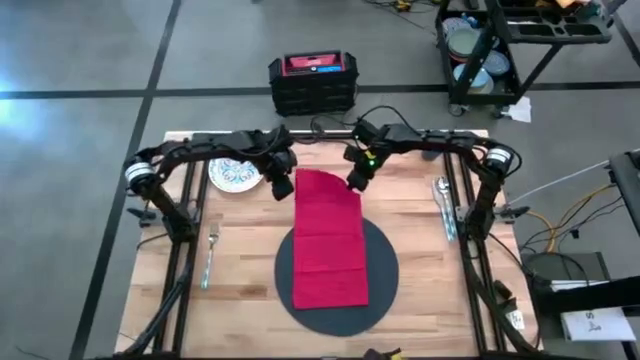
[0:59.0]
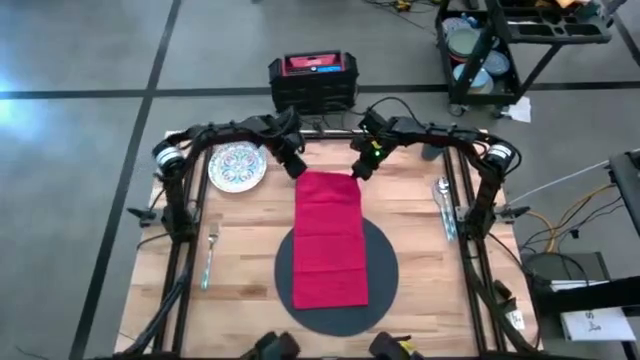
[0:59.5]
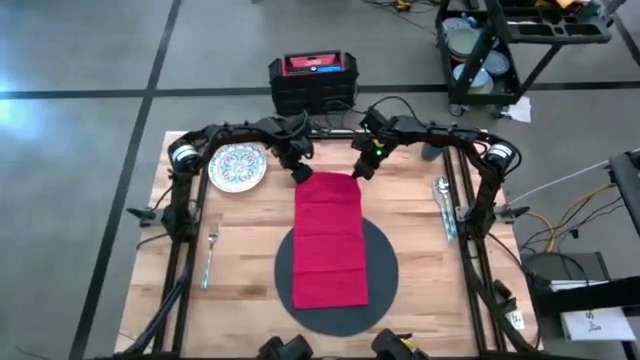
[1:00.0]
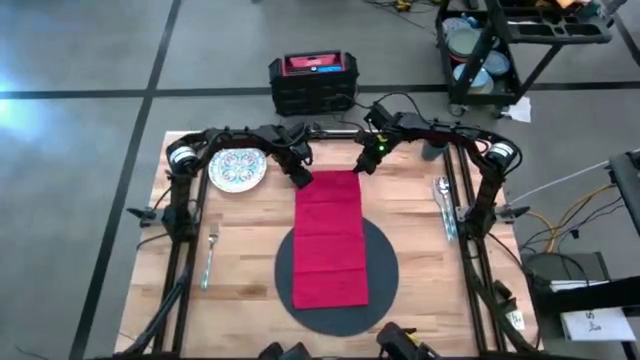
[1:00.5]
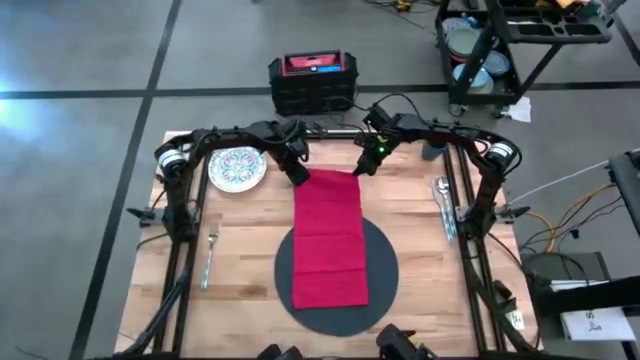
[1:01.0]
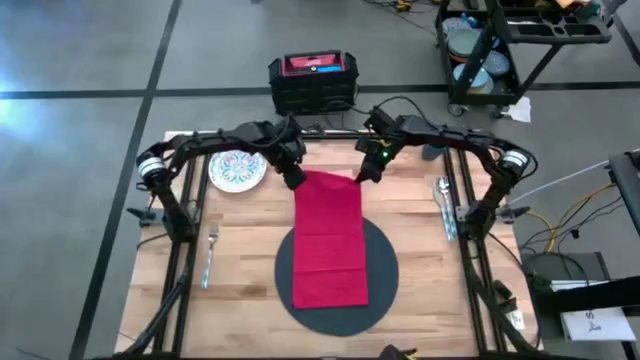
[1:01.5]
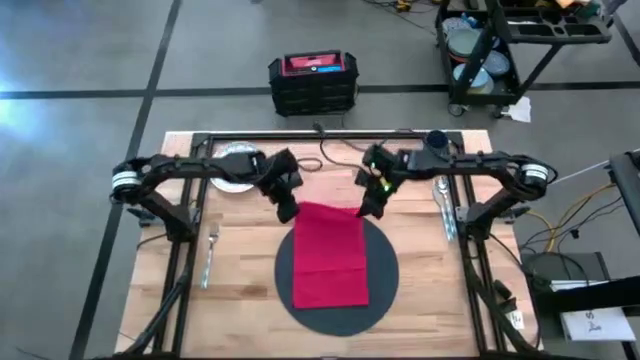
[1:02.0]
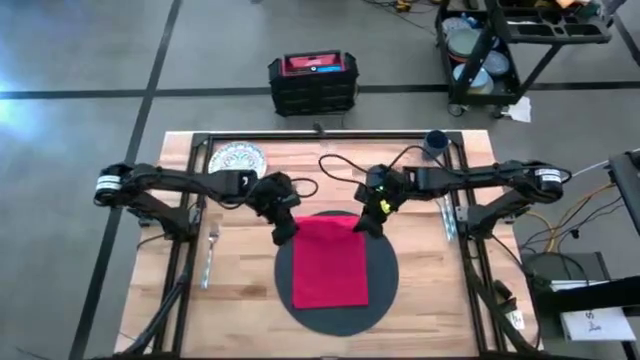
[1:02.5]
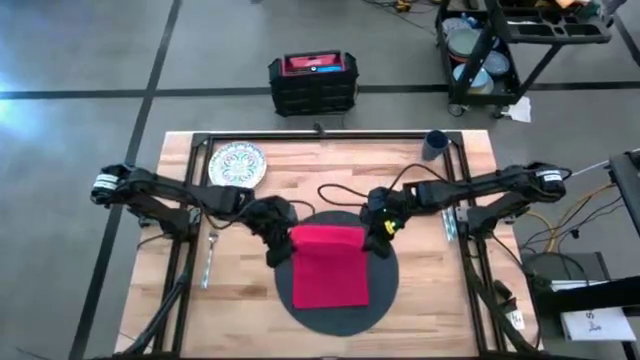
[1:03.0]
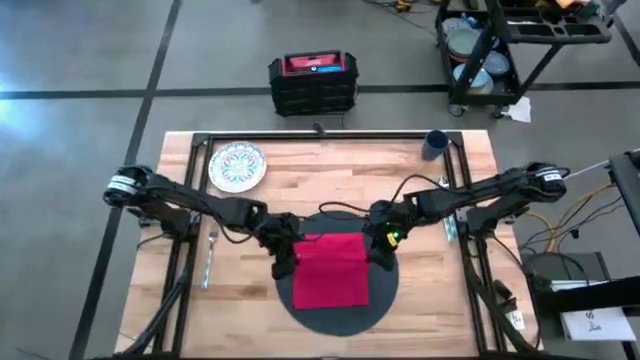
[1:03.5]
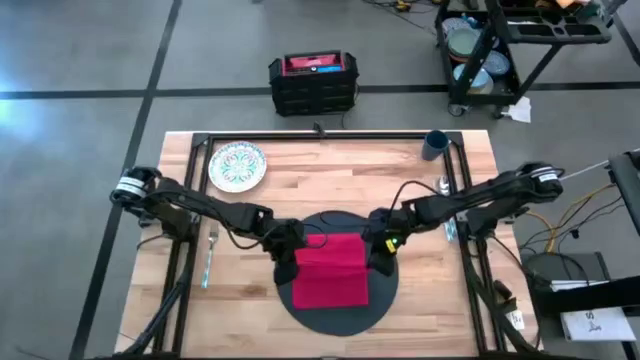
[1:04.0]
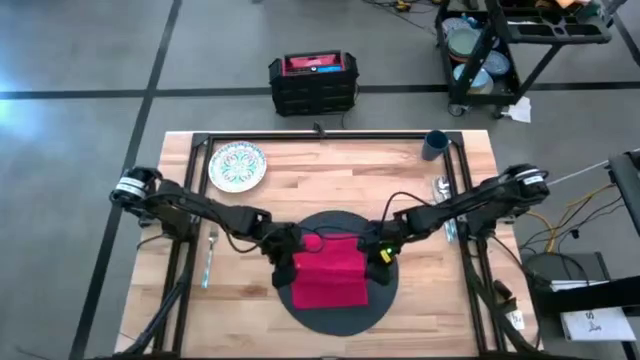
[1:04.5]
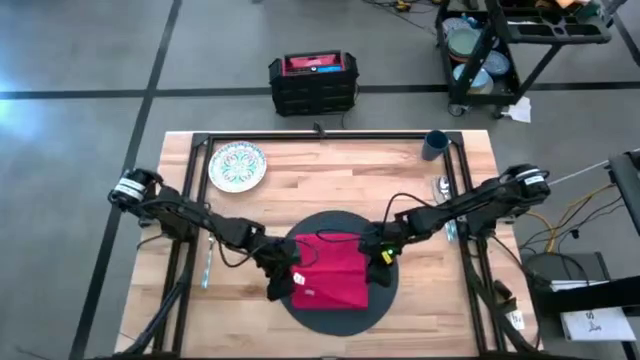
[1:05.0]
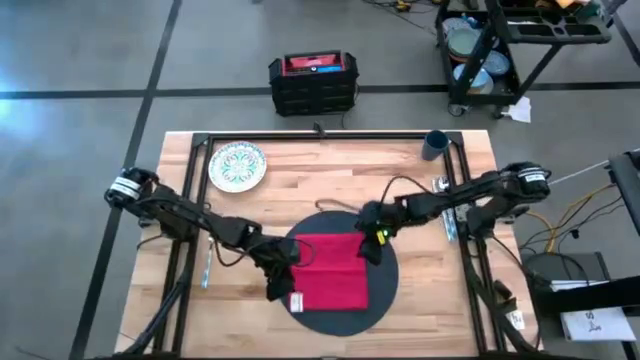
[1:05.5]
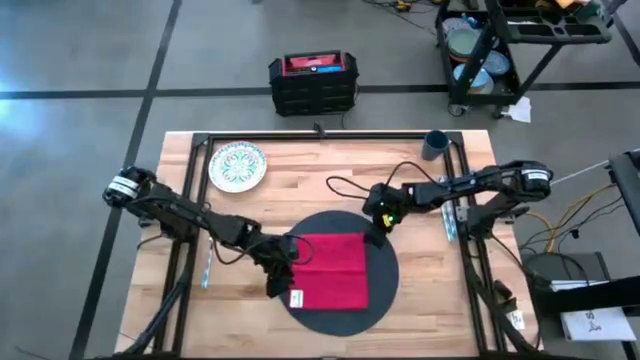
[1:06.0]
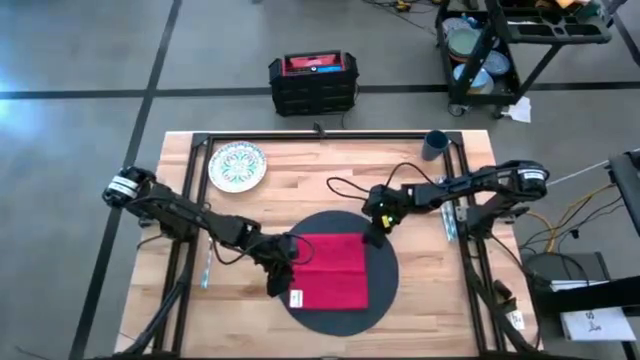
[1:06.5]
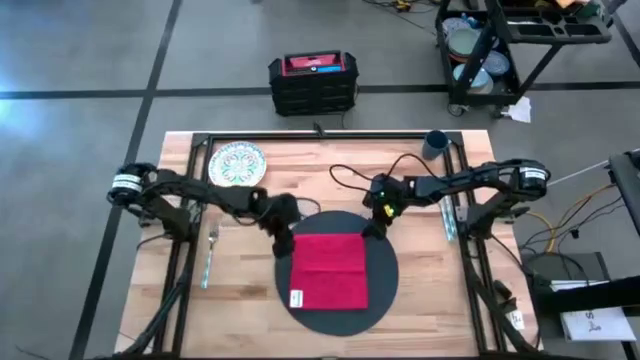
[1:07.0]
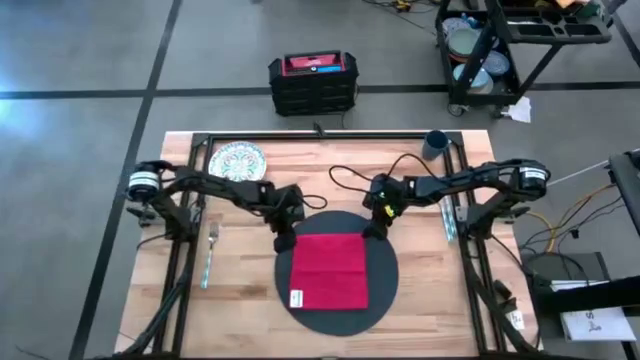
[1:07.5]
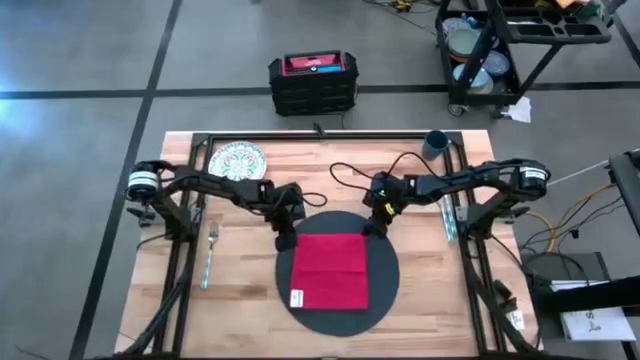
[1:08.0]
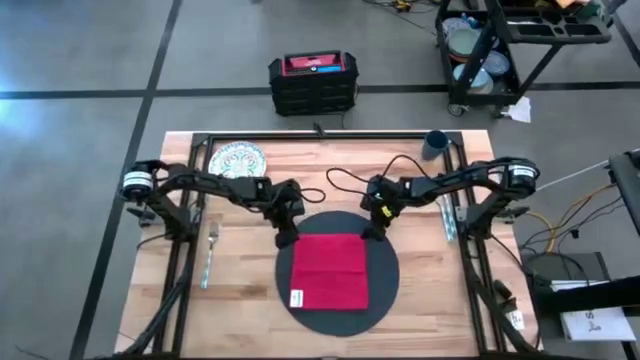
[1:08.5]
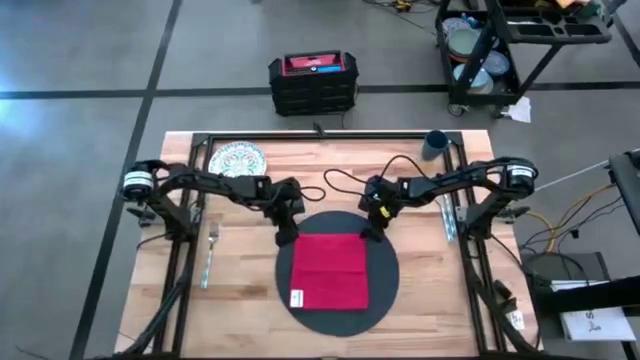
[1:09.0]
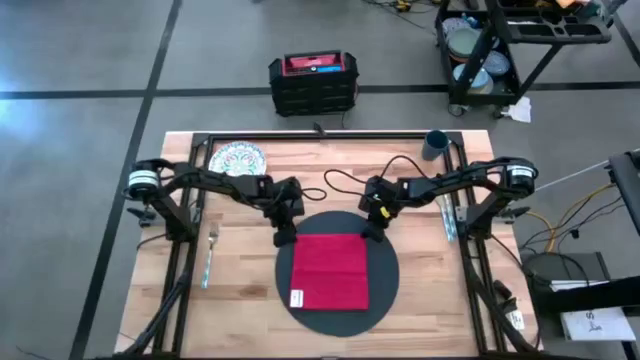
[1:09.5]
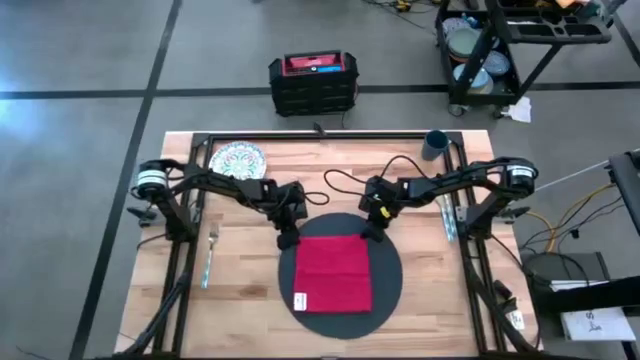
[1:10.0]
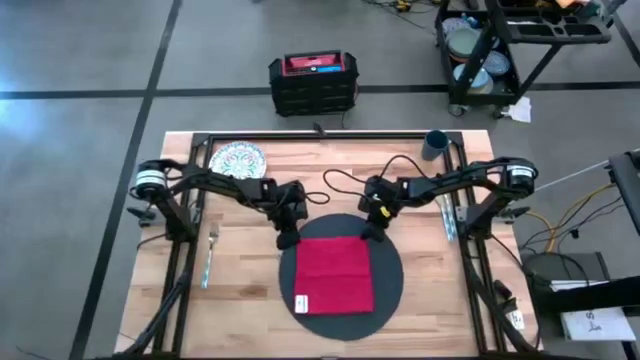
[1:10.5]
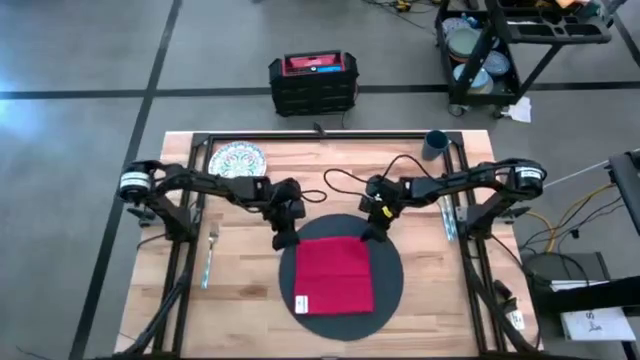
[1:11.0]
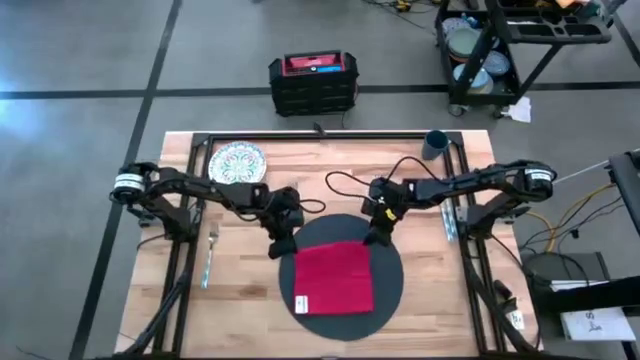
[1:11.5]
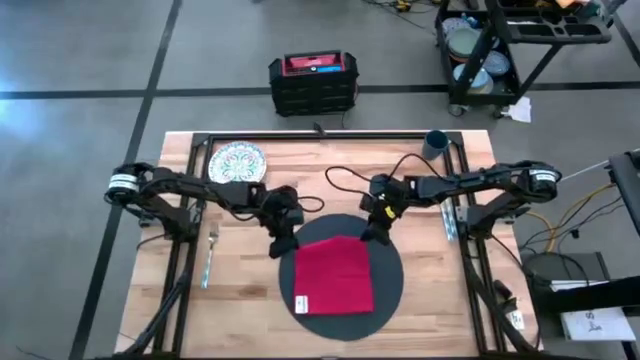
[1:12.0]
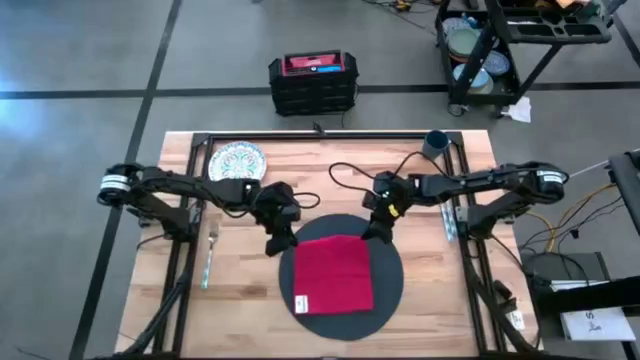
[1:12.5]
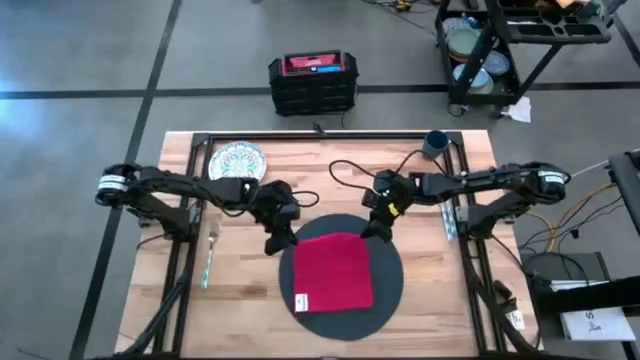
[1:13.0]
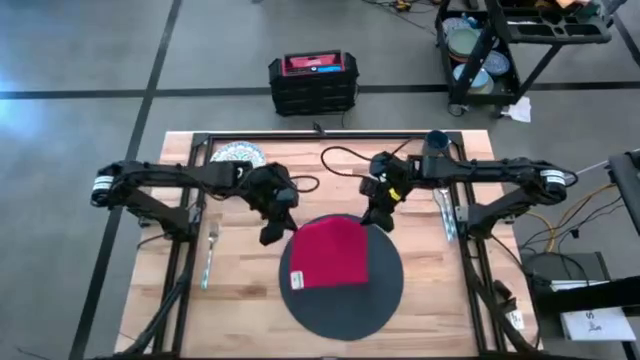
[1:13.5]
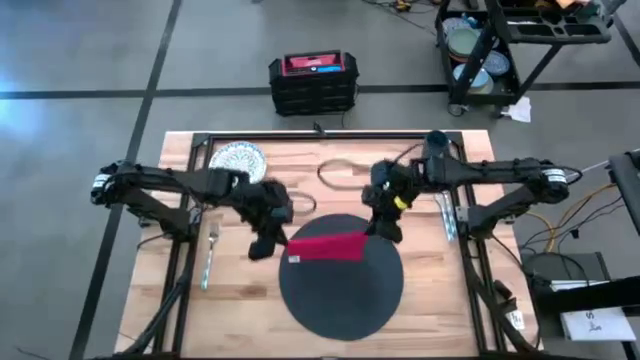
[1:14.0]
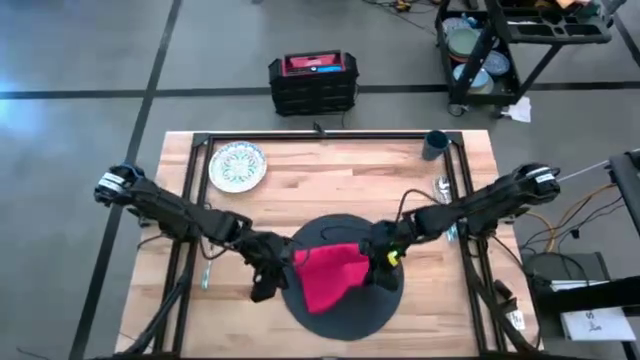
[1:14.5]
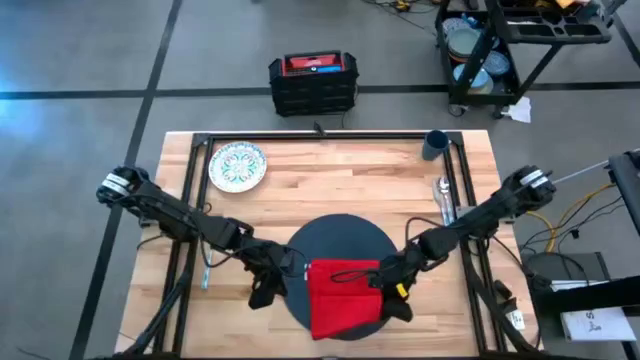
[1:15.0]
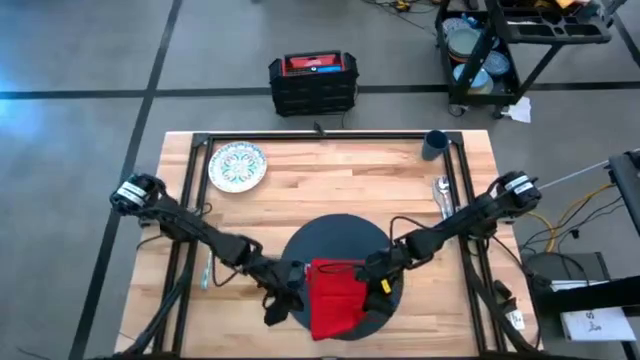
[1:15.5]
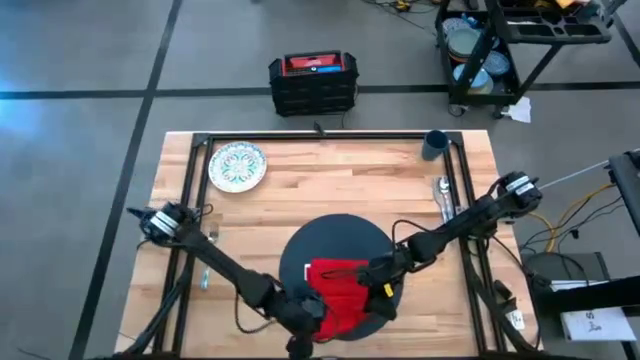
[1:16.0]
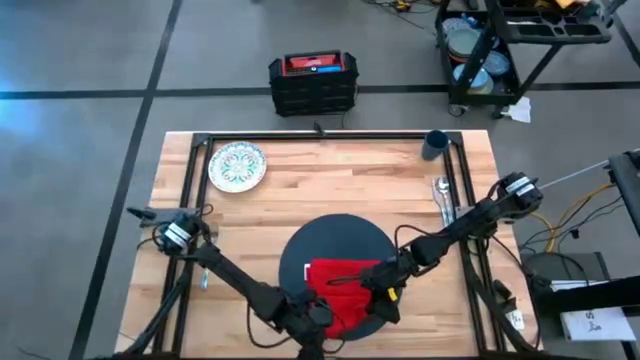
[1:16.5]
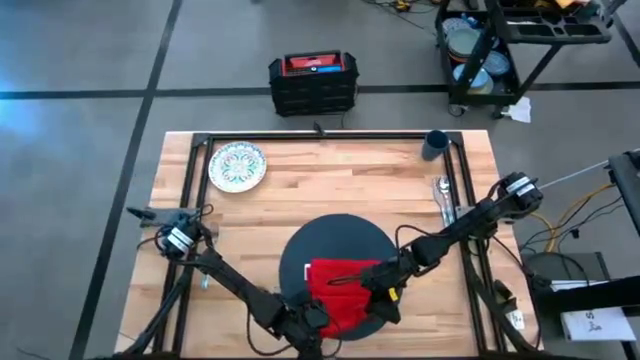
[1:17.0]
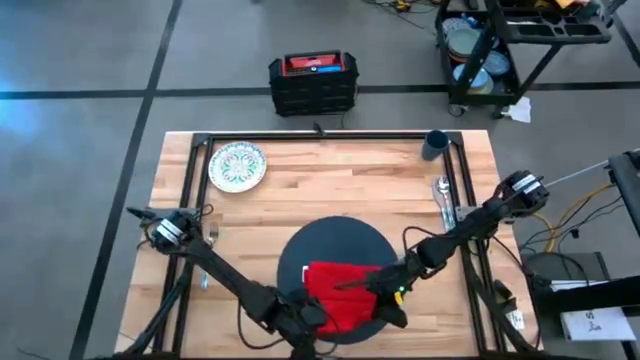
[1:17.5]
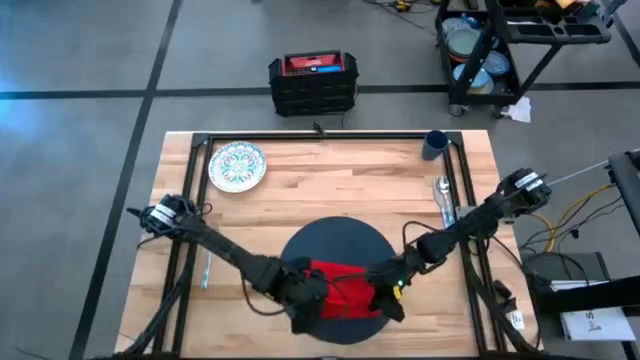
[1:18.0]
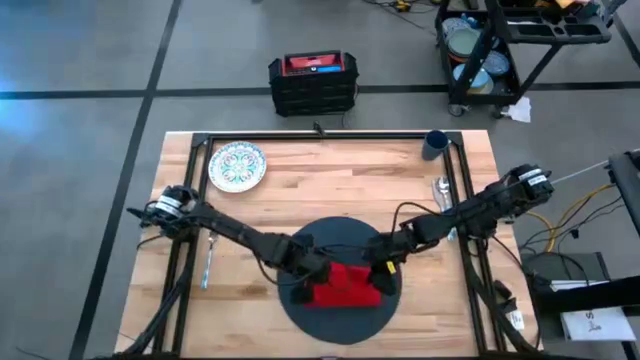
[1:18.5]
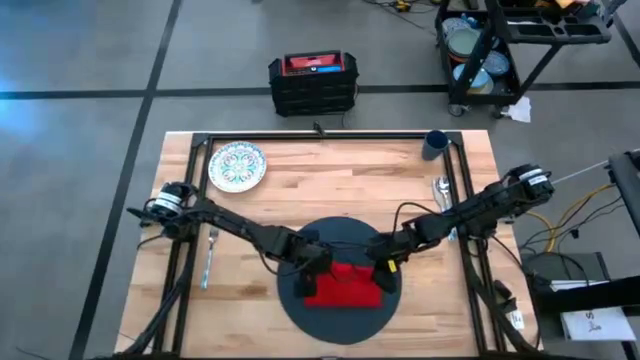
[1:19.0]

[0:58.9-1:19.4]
Task: Set table place
Fold the red napkin on the table
